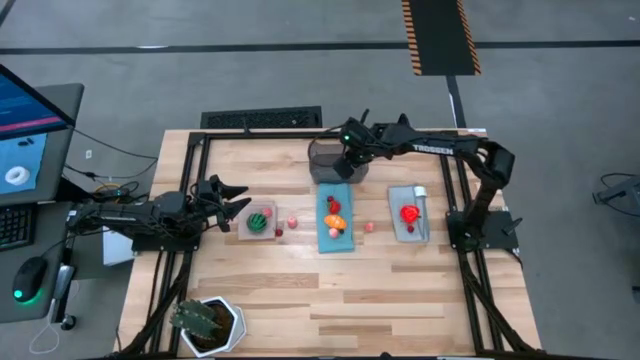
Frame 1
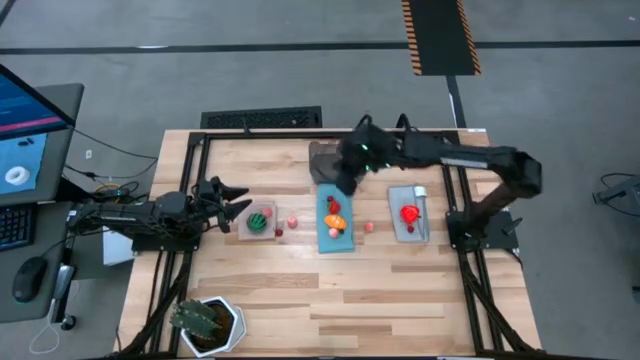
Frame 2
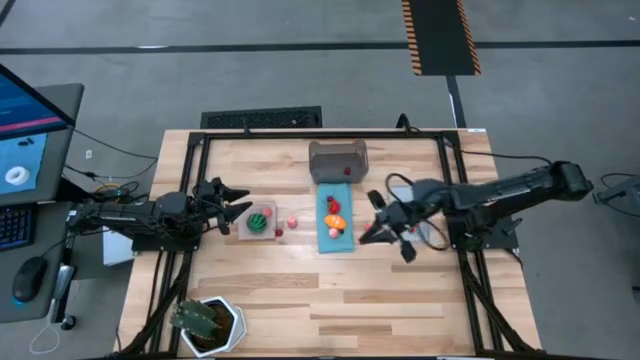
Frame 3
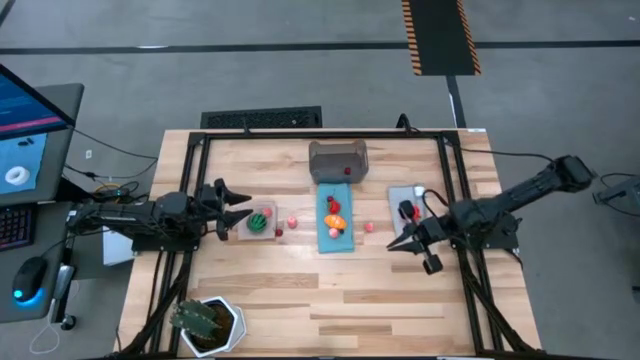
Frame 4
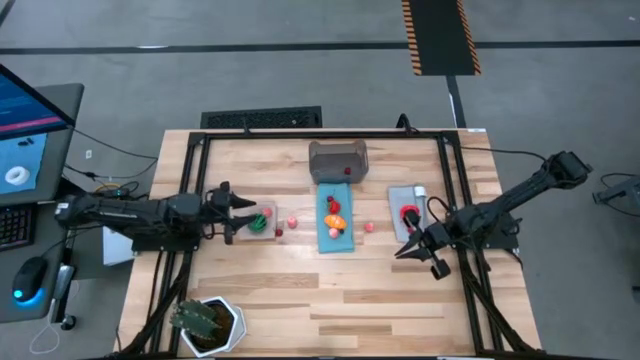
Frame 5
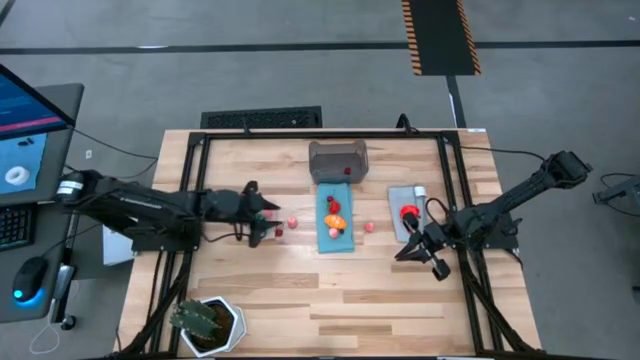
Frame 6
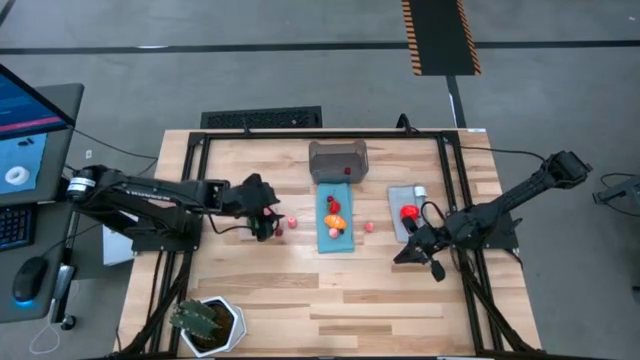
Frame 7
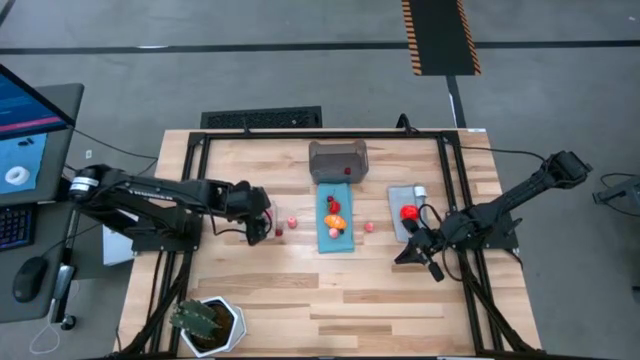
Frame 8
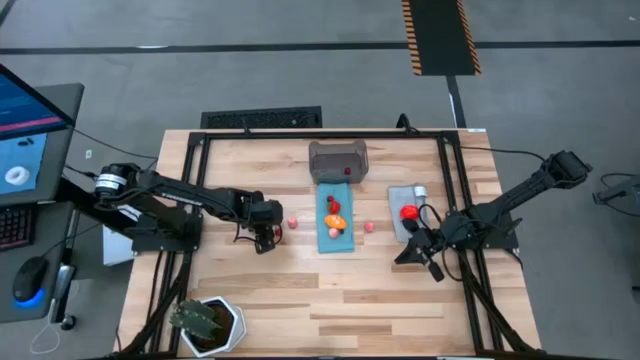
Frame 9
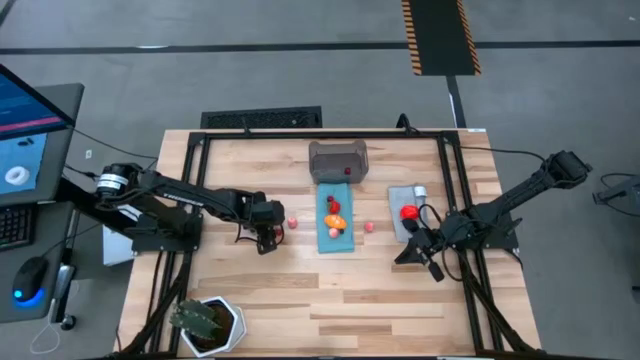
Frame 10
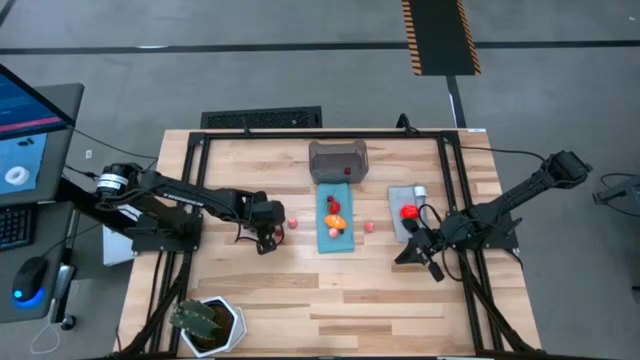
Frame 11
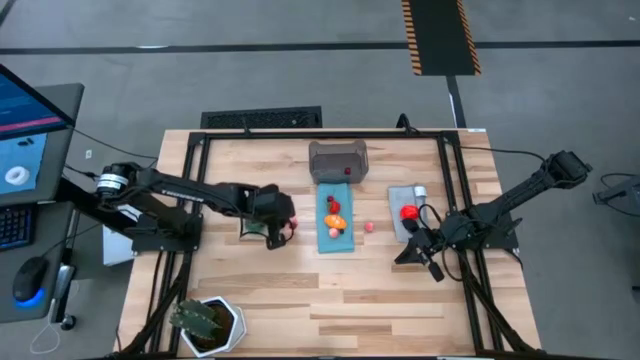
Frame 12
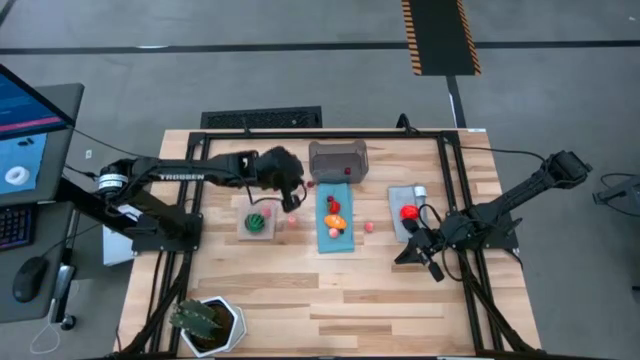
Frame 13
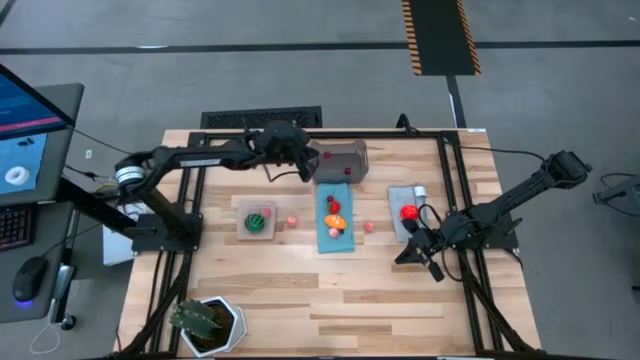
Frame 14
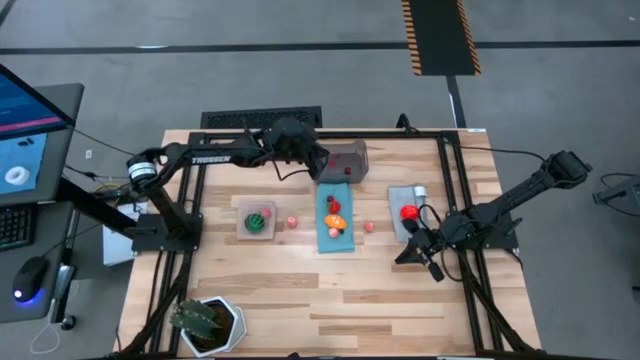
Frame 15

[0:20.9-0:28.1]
Task: Pick and placing Produce into tupperware
Put the red cherry into the gray bin

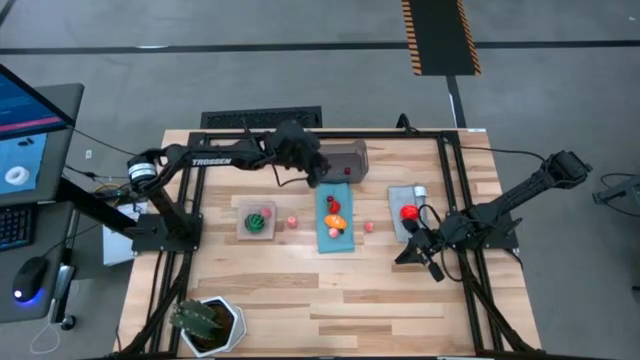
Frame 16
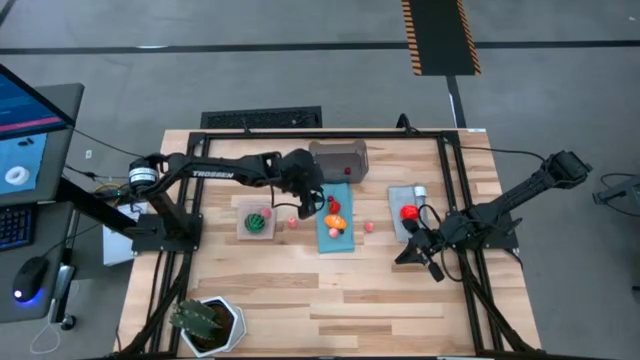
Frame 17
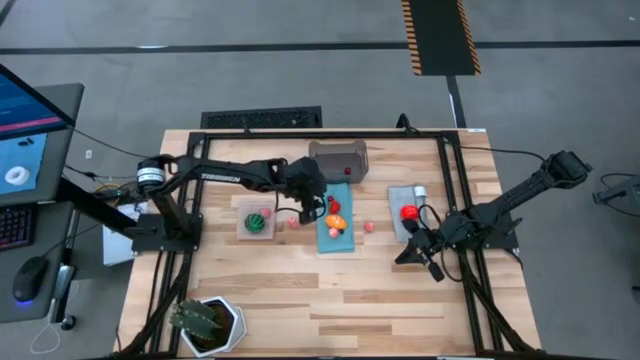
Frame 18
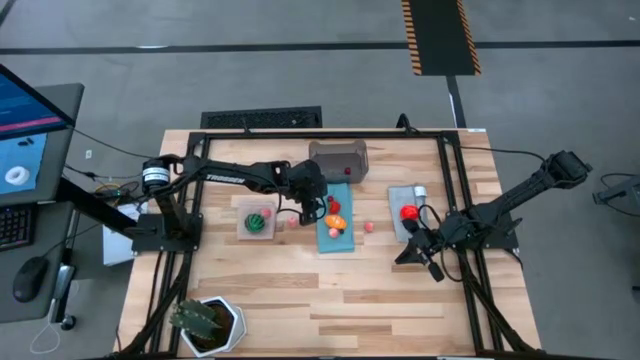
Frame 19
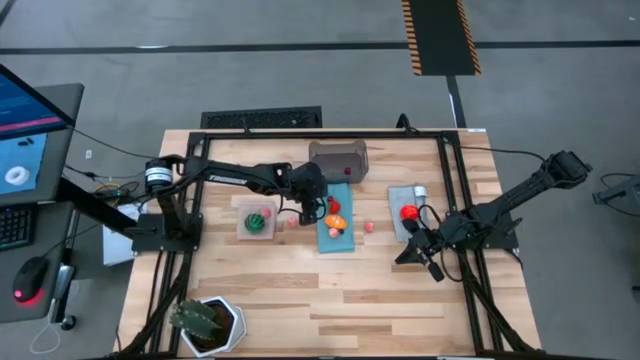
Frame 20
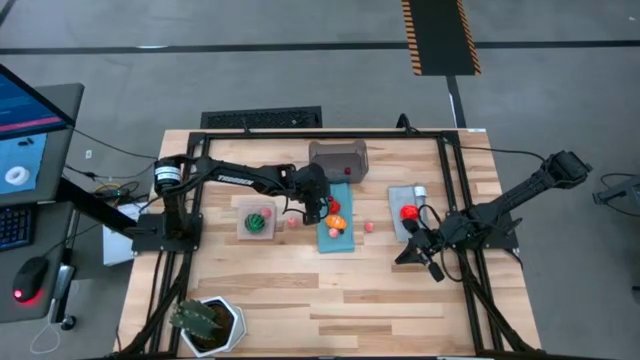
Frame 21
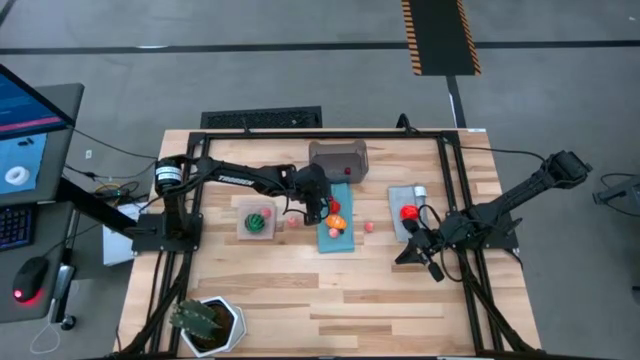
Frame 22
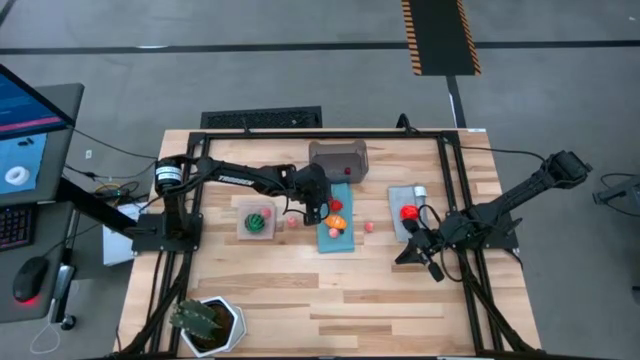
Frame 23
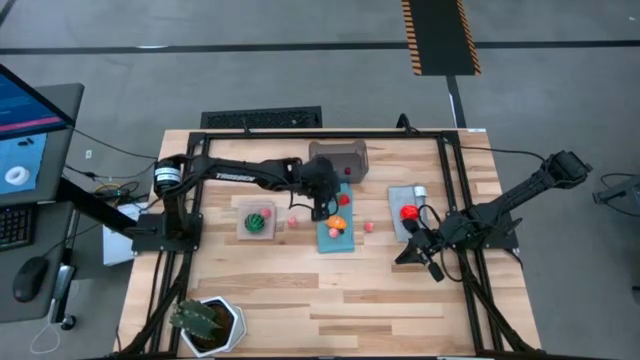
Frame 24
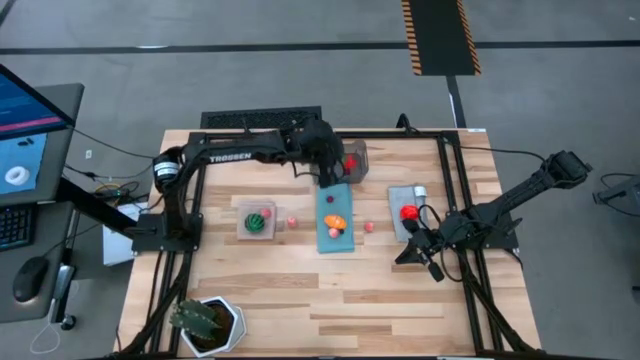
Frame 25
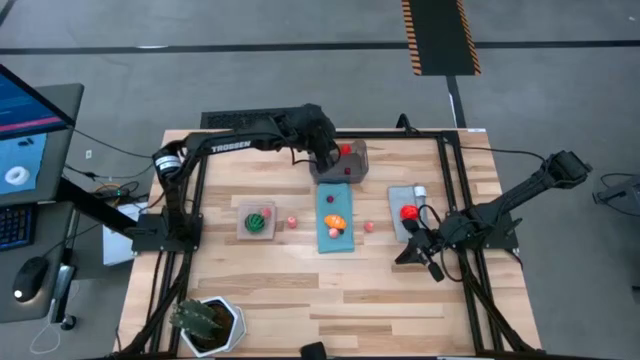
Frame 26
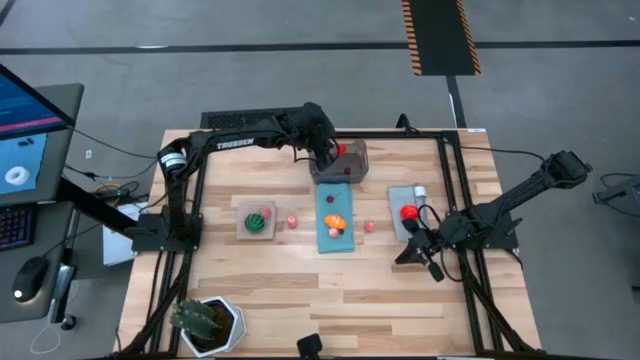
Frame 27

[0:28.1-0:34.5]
Put the red strawberry into the gray bin

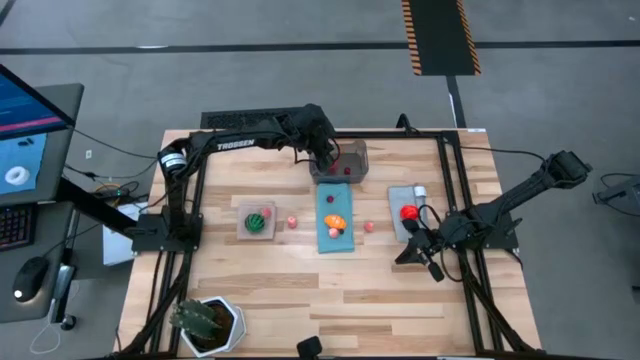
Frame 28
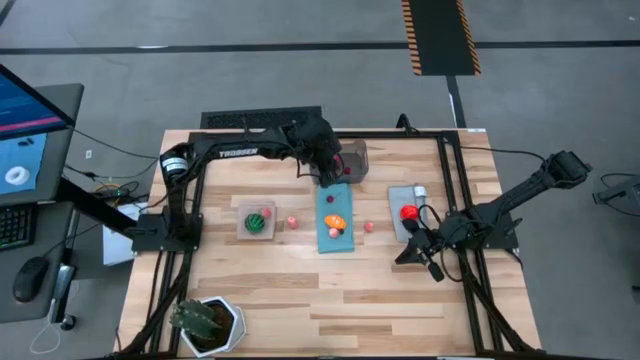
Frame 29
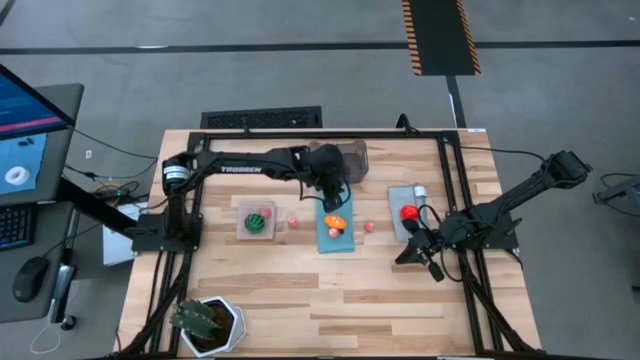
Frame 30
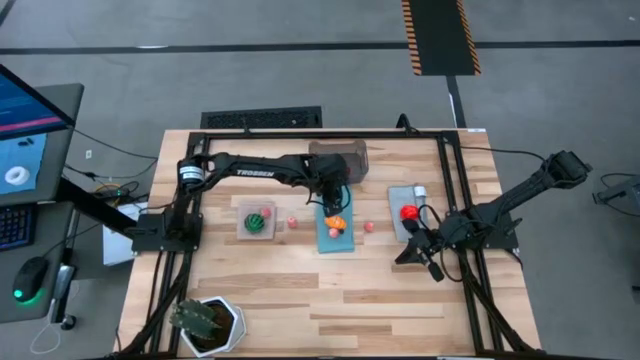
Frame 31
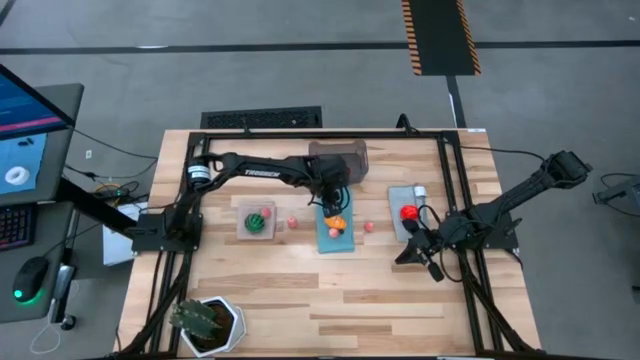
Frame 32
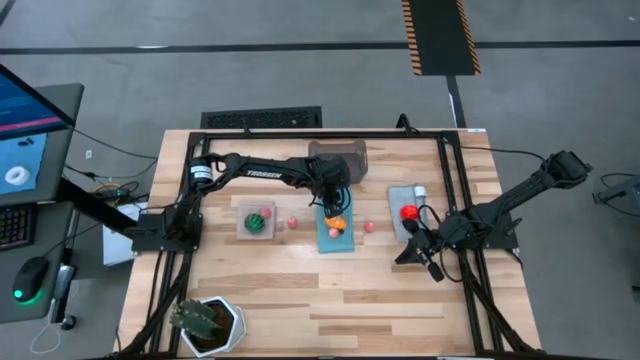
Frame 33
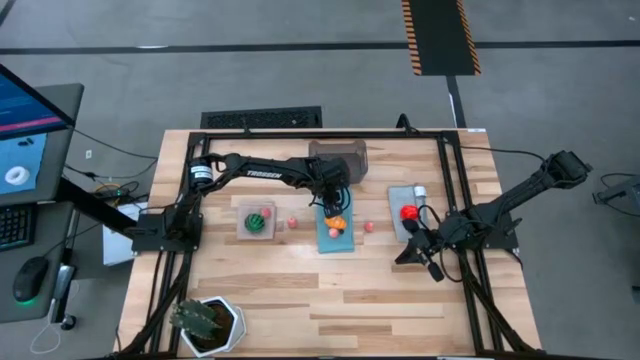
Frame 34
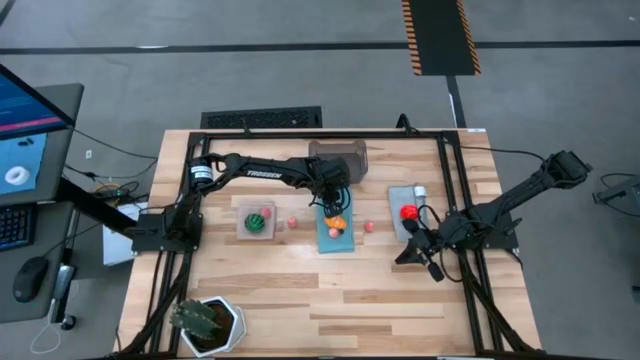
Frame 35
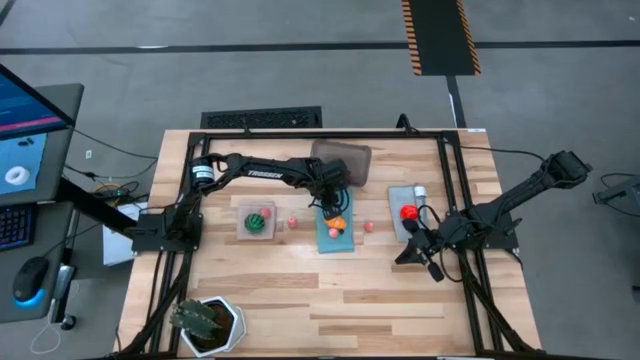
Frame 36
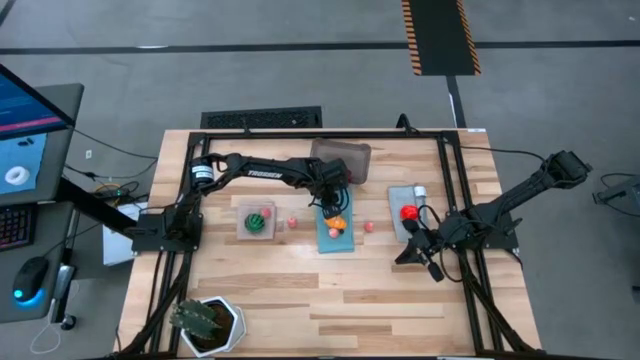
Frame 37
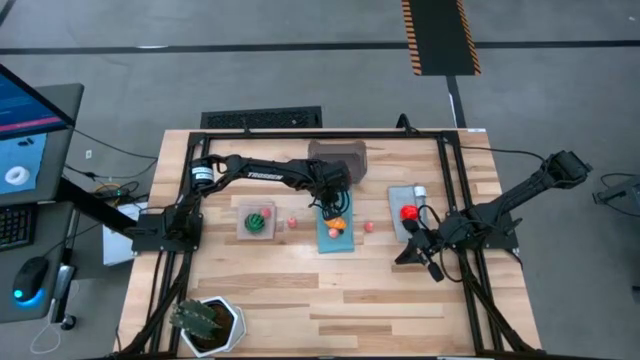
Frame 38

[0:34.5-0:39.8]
Put the red cherry into the gray bin

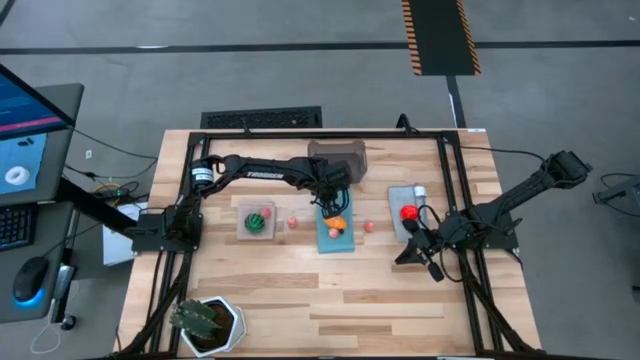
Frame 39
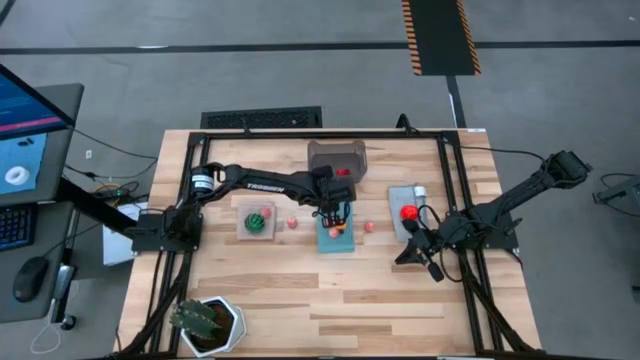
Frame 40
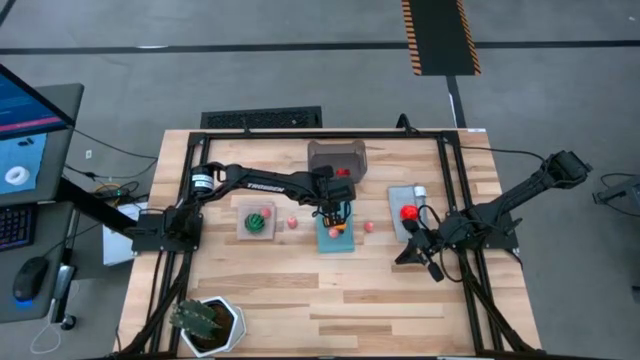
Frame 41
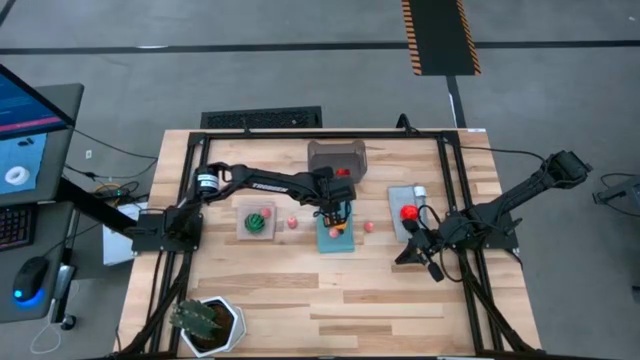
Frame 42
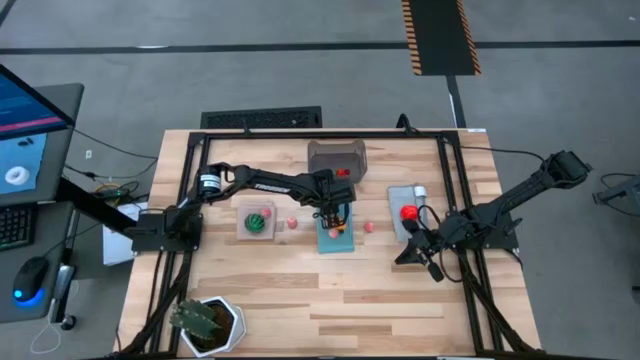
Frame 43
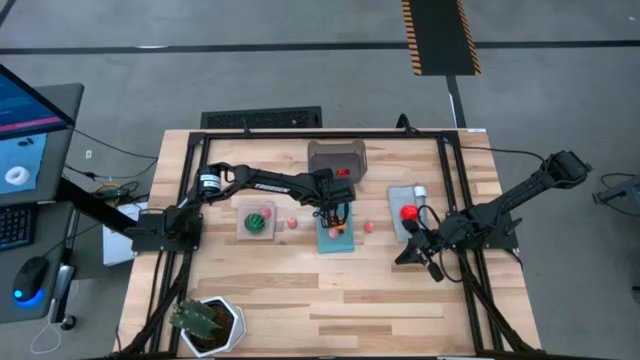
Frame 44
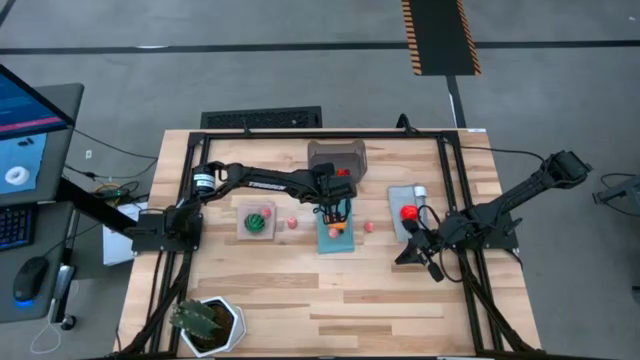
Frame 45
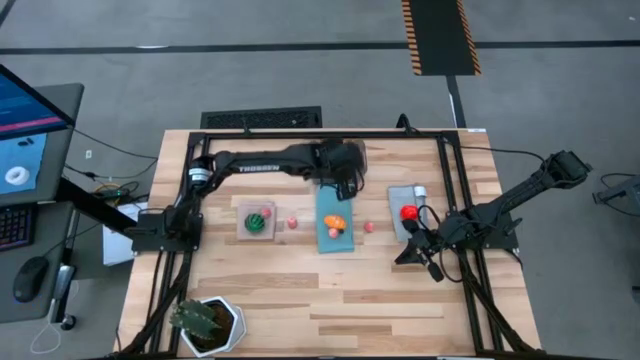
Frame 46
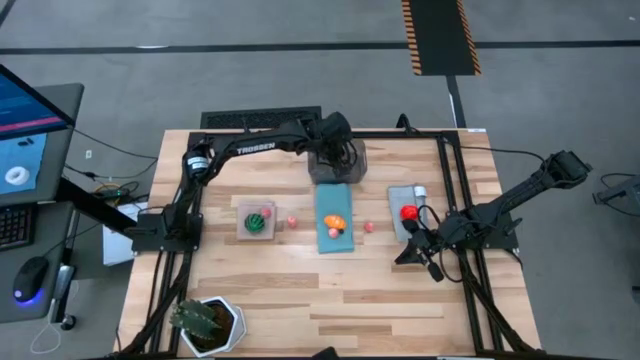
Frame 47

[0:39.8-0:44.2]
Put the red cherry into the gray bin
